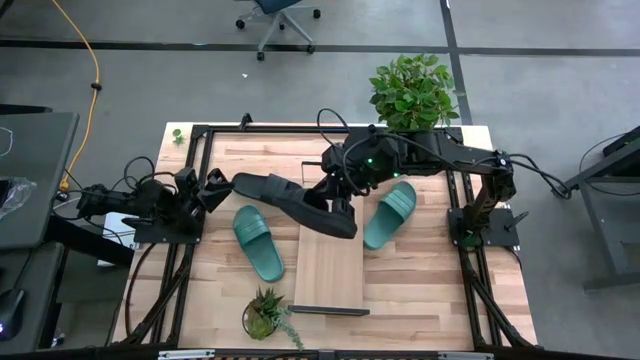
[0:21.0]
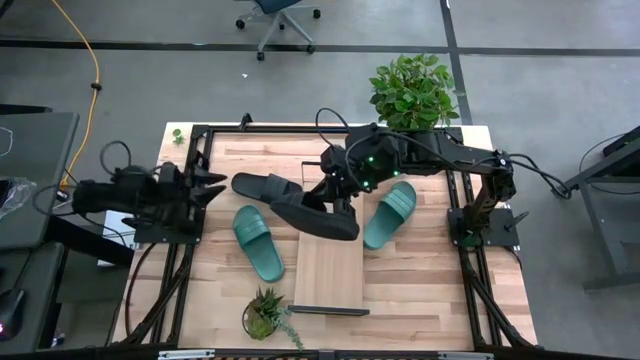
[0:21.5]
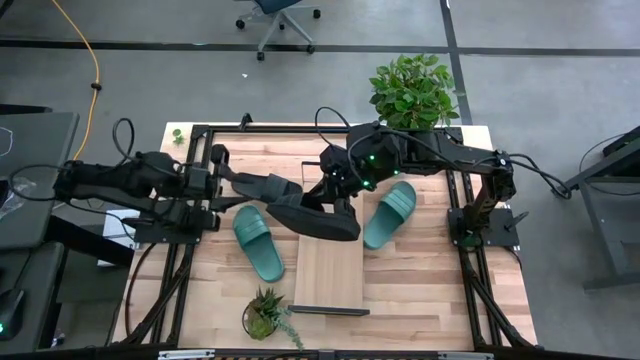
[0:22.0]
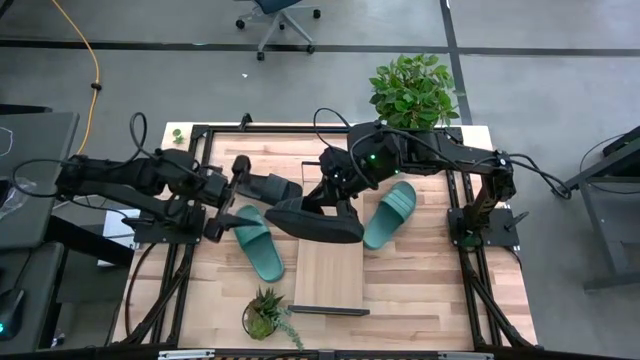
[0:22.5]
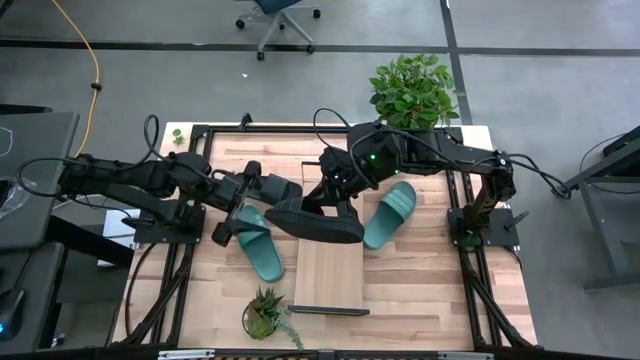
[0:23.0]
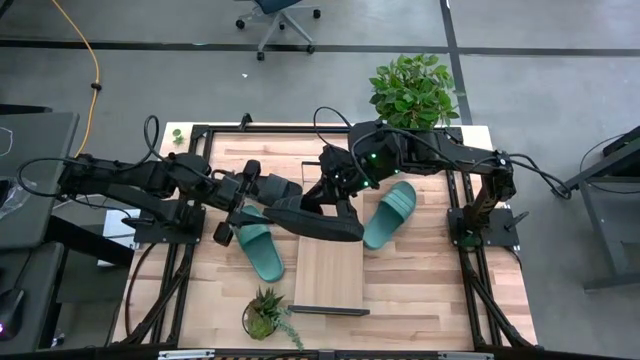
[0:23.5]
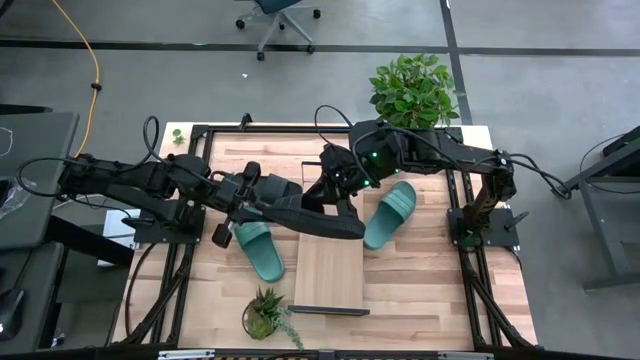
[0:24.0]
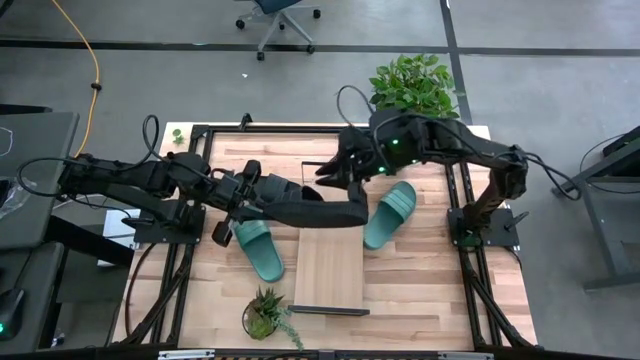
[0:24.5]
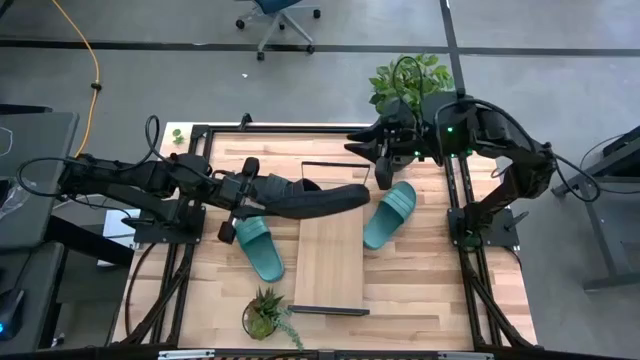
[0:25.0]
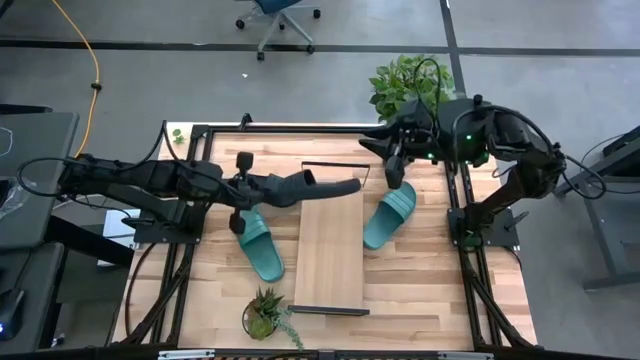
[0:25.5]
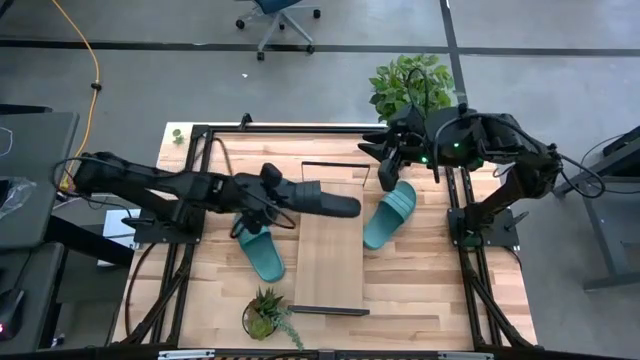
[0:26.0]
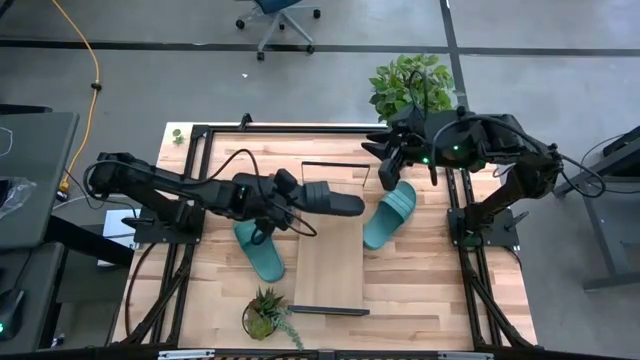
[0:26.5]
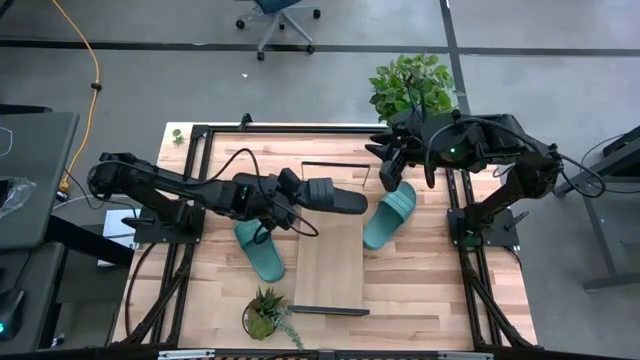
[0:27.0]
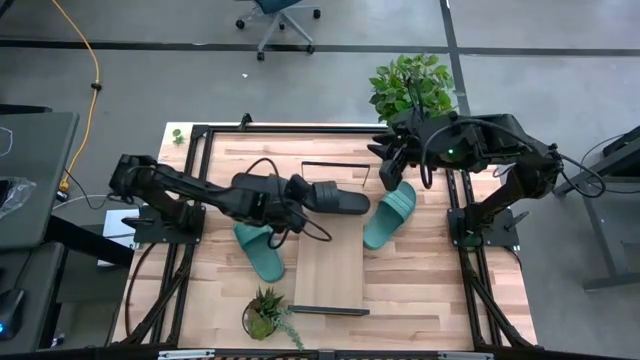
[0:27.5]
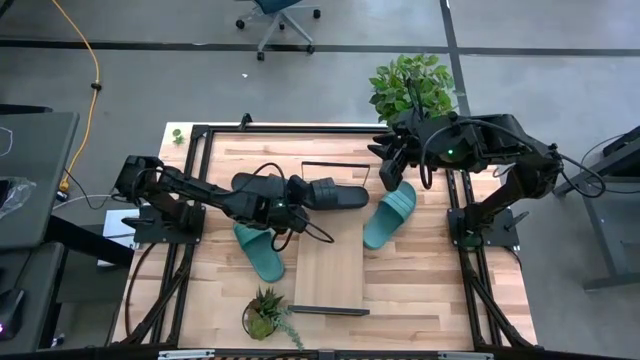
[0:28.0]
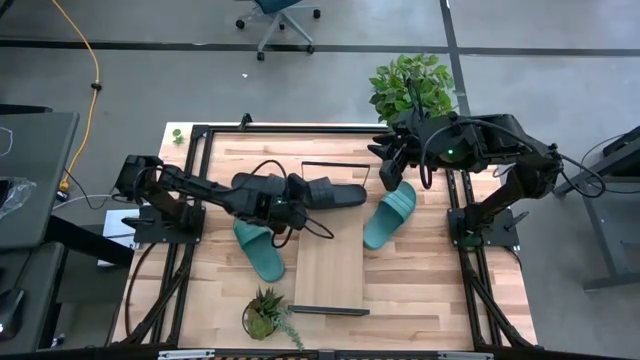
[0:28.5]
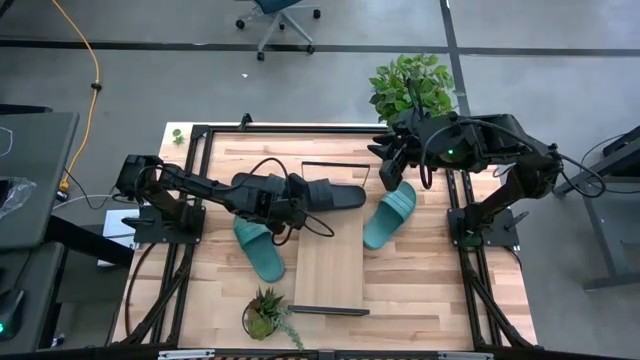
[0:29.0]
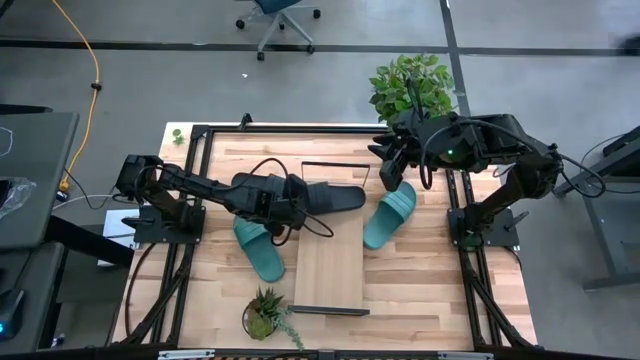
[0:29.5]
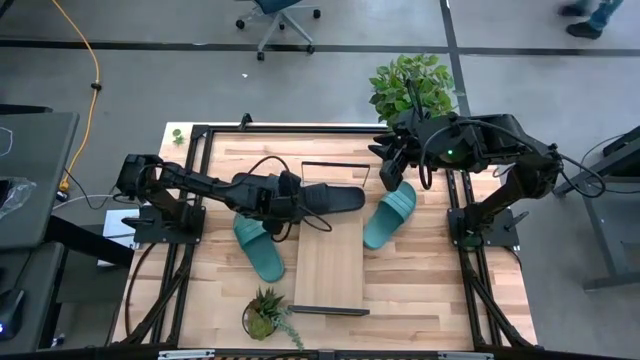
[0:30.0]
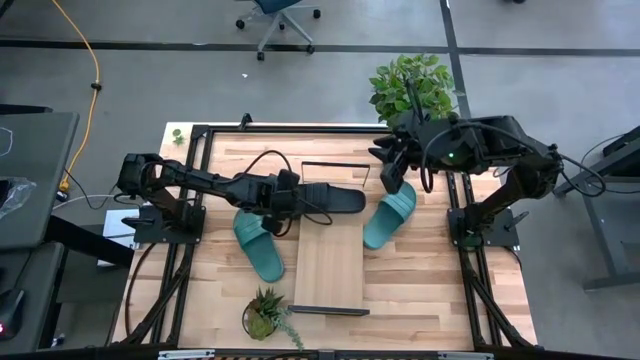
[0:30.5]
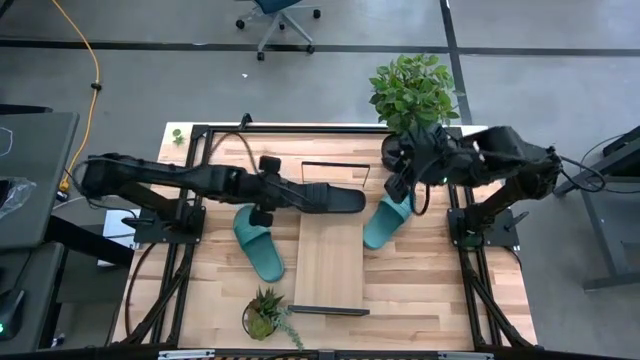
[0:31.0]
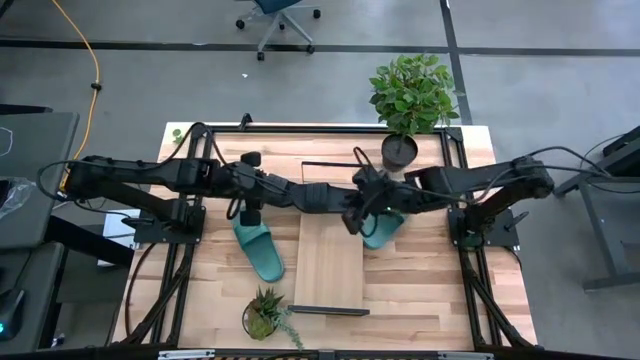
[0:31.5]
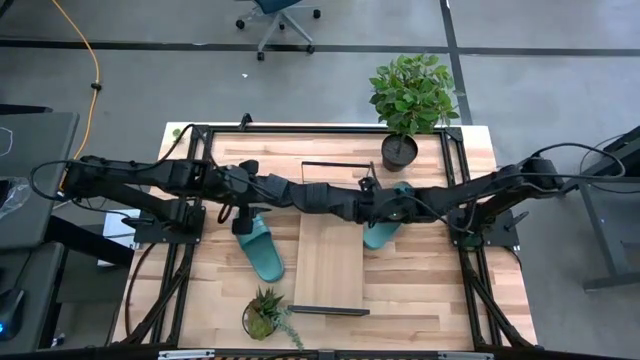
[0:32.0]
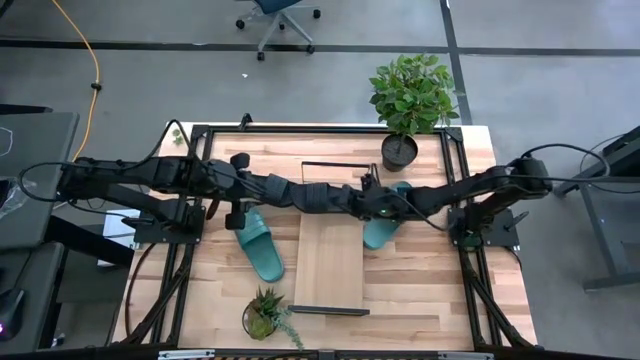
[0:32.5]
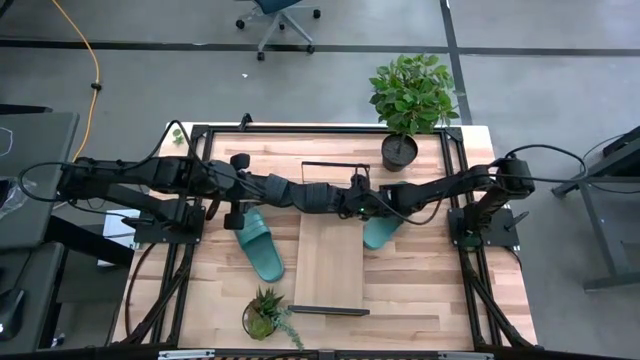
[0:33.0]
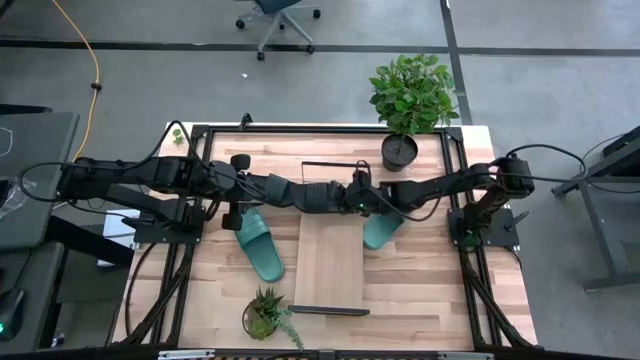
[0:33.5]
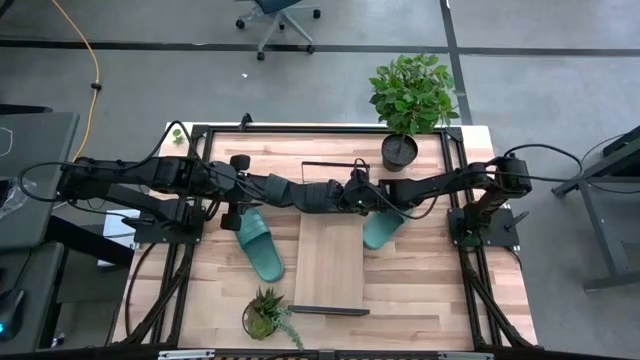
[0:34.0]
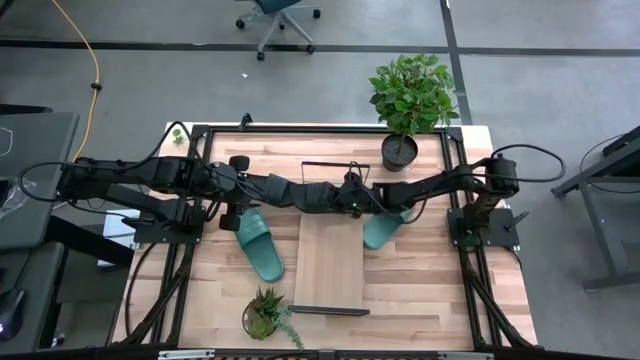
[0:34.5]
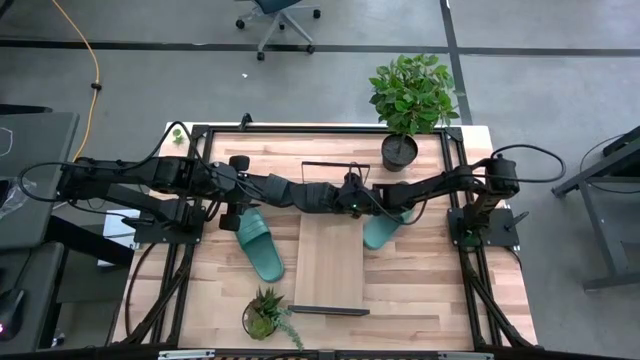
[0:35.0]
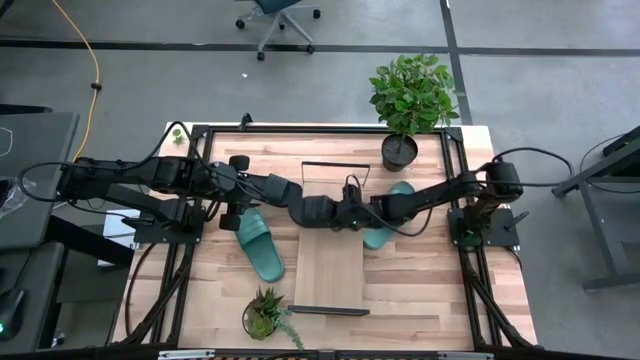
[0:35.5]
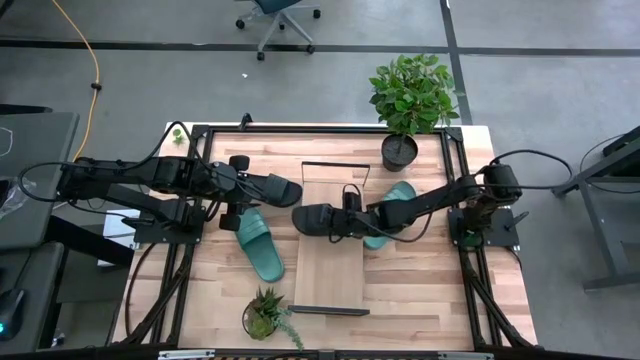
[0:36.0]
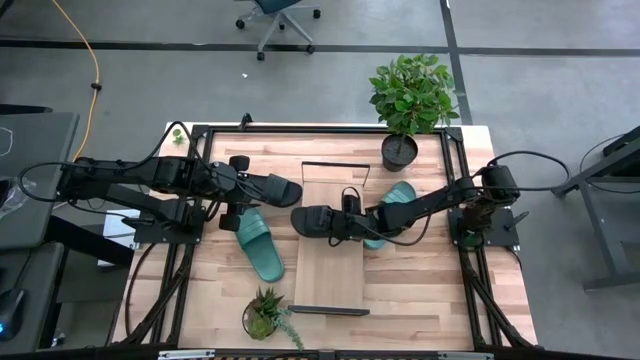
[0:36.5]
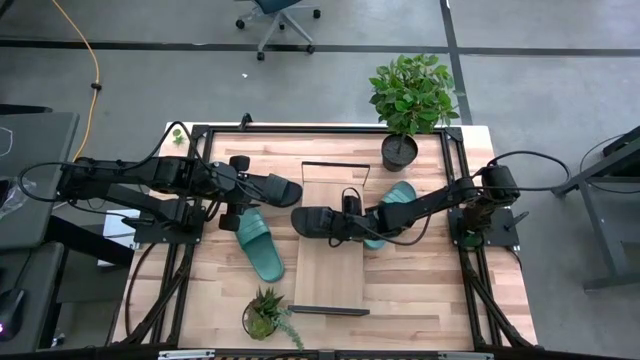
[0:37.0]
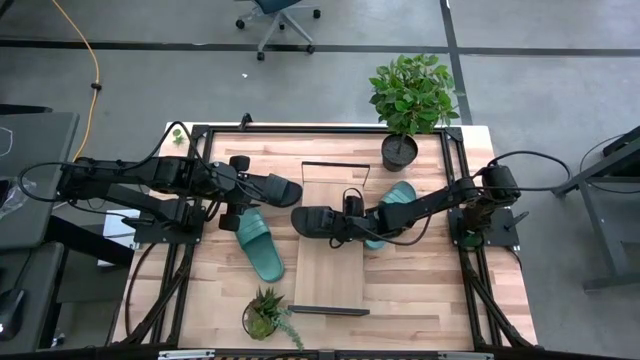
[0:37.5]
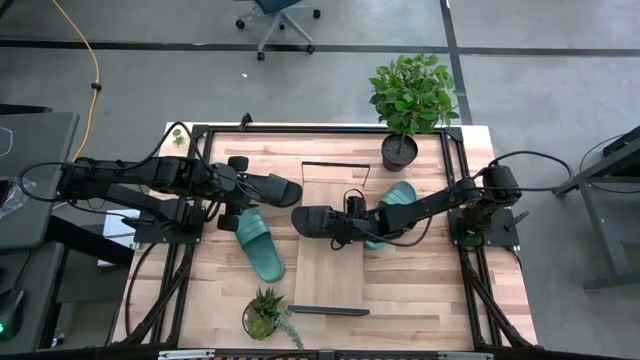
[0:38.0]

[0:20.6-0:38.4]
Task: Pick and place slides into the shelf
Put the right black slides on the shelf

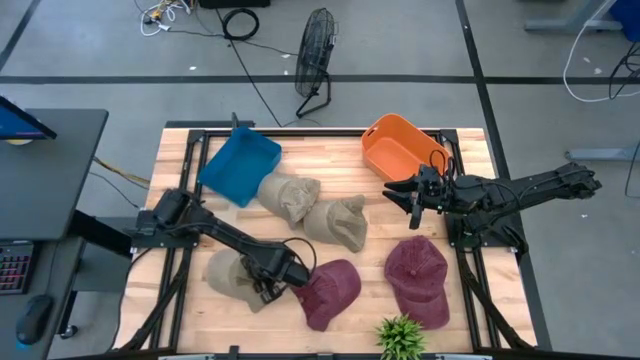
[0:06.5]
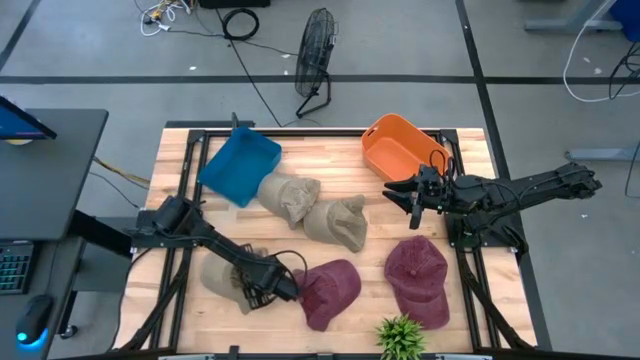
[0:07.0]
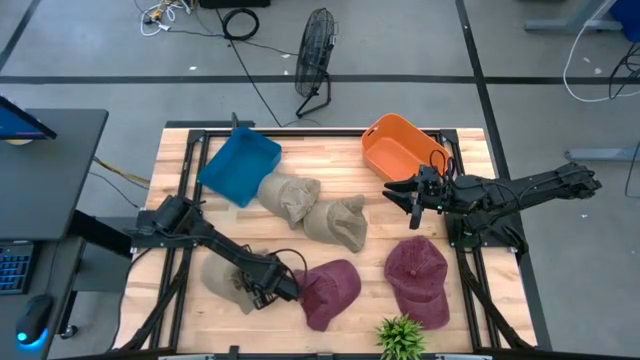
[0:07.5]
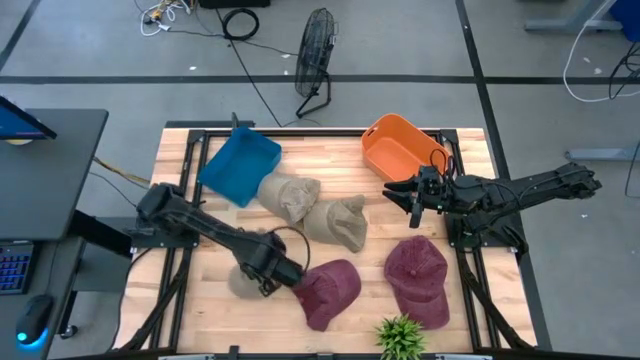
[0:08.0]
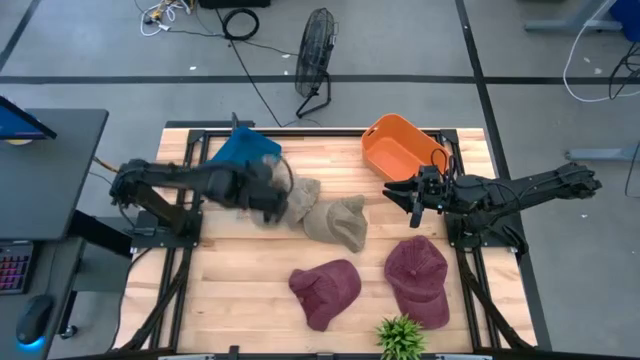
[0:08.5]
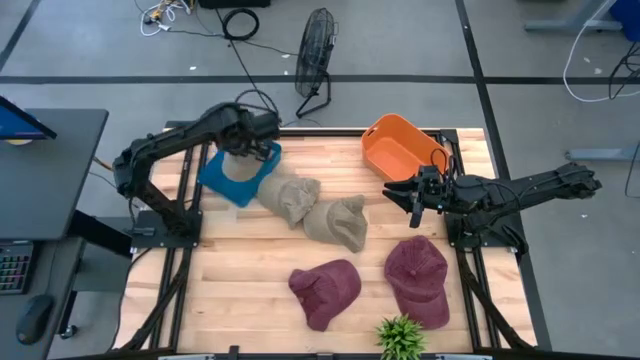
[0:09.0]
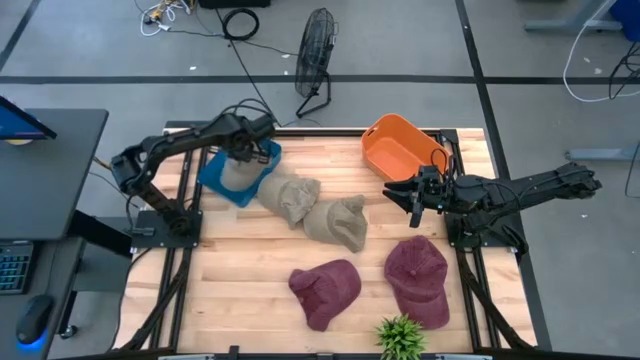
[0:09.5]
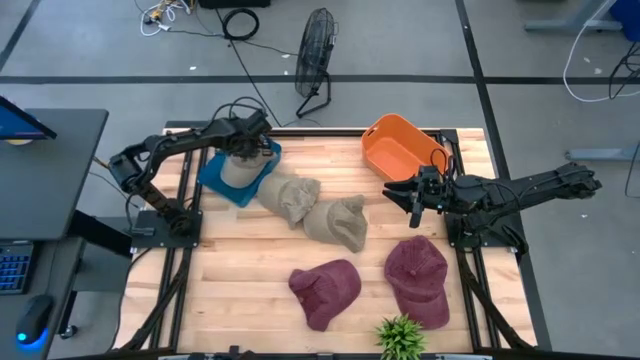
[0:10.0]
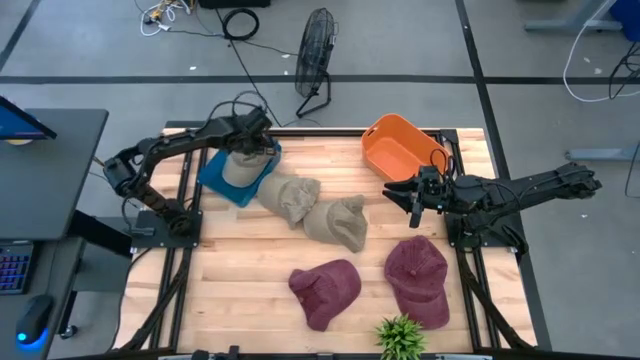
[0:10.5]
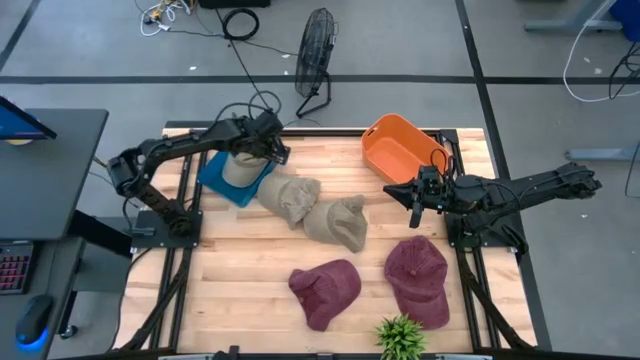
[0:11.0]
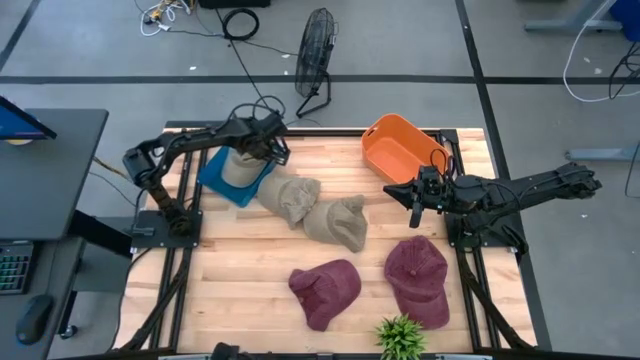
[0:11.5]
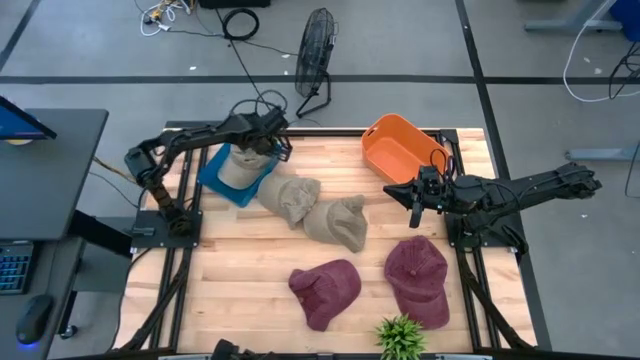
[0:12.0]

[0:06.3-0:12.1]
Task: Pick & Place hat
Put the bottom brown cap into the blue bin
